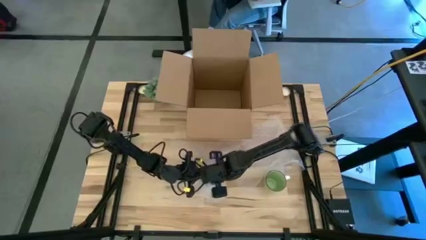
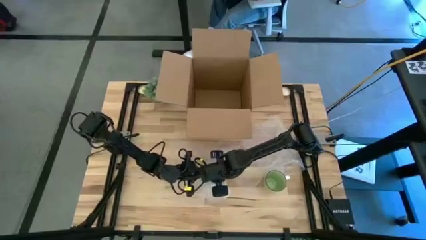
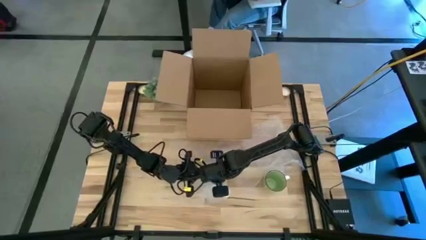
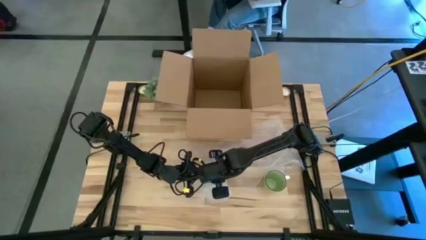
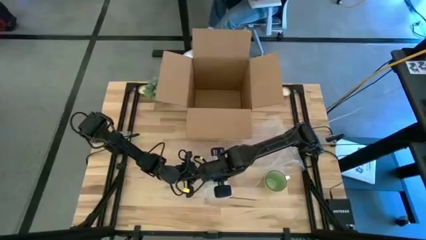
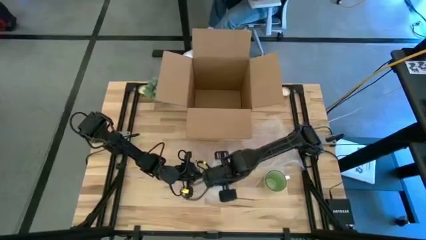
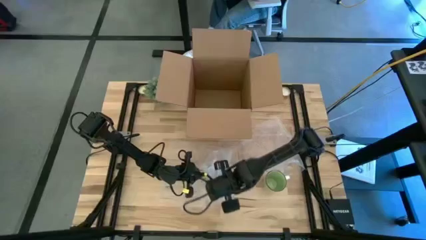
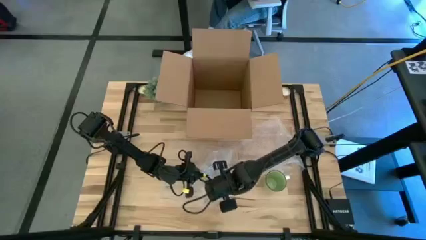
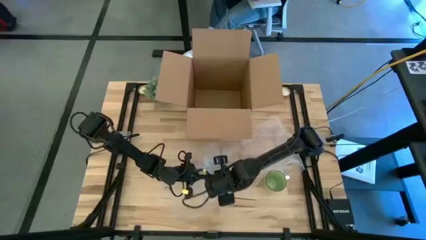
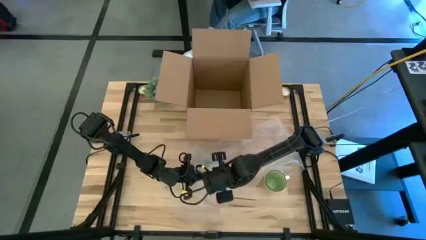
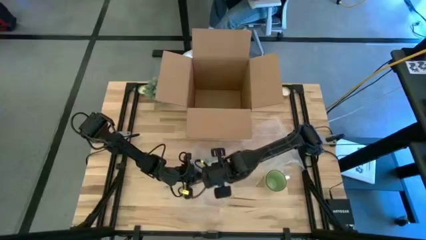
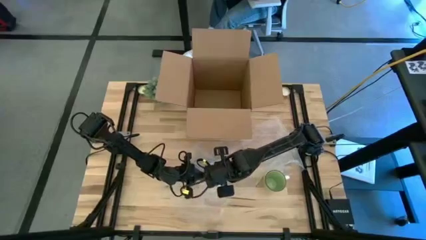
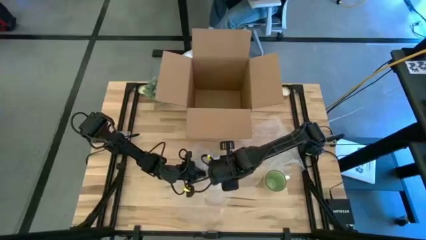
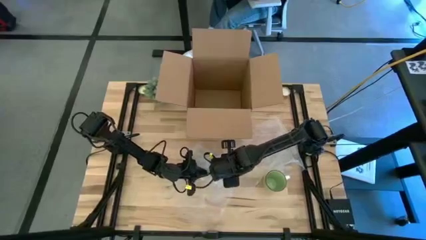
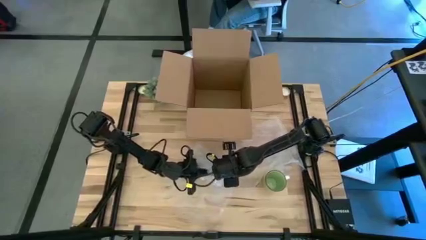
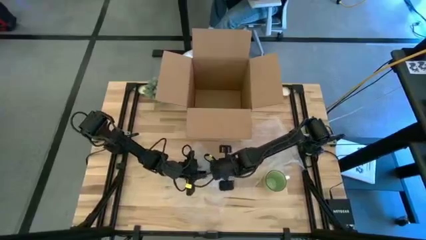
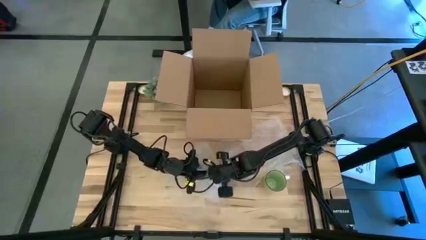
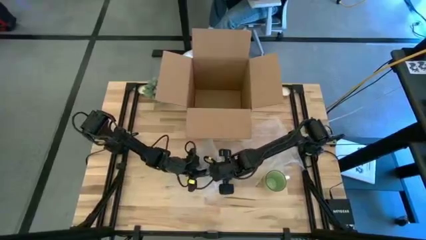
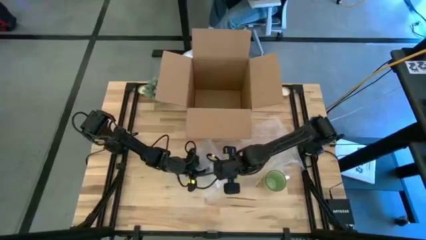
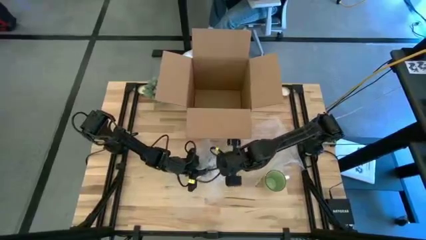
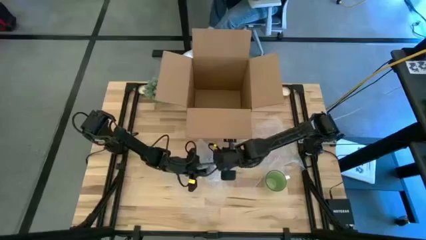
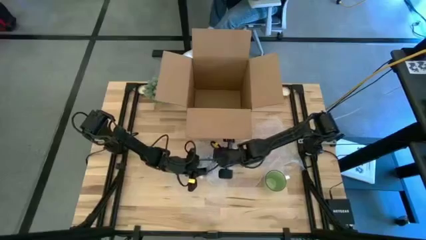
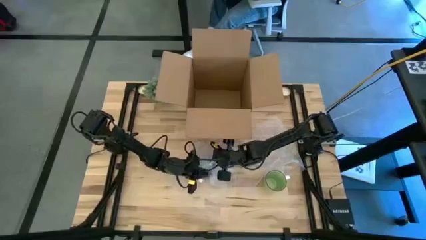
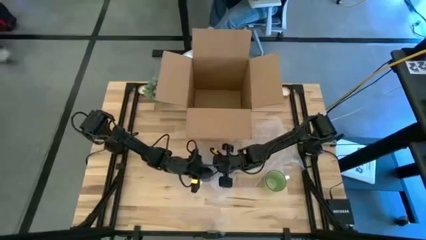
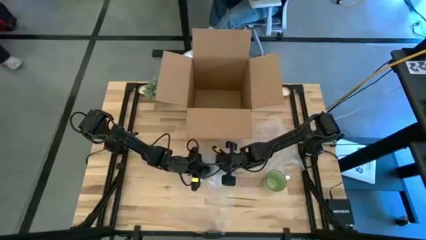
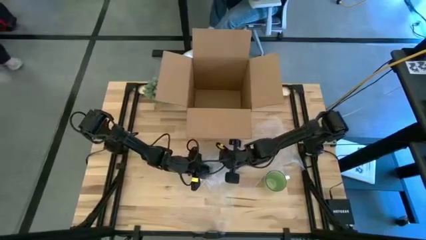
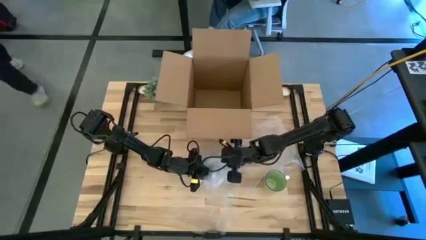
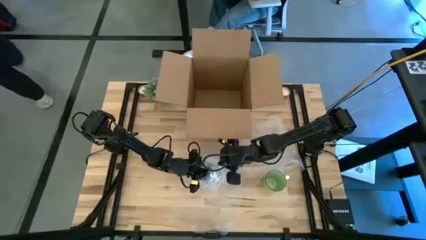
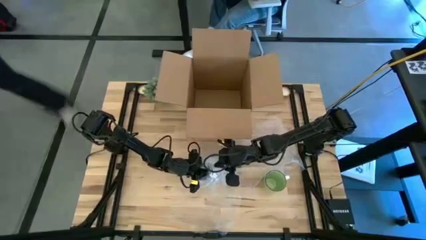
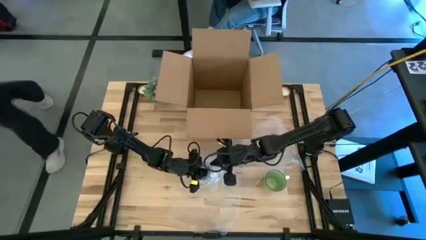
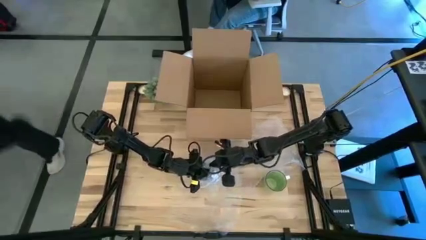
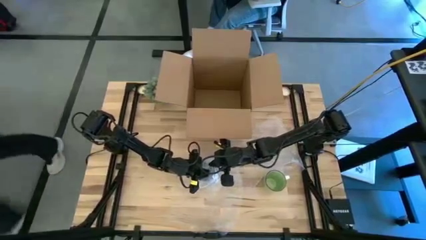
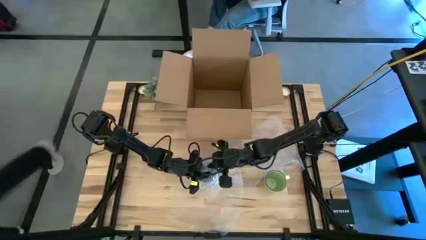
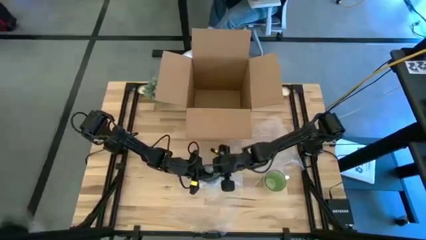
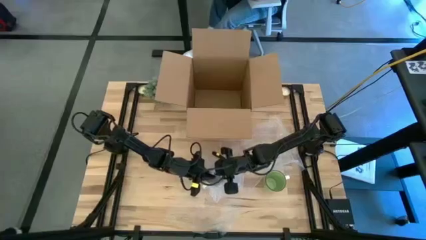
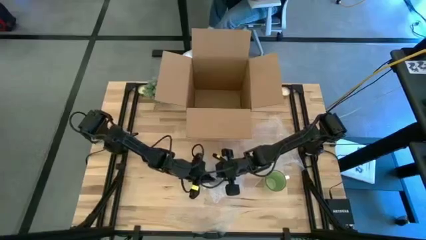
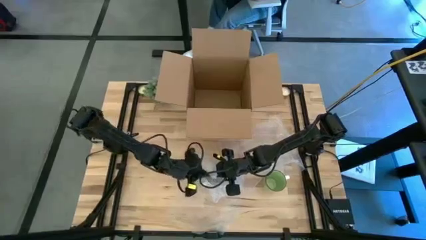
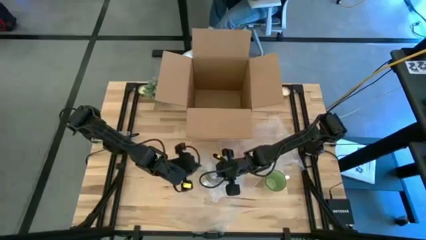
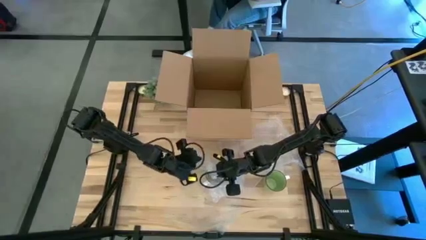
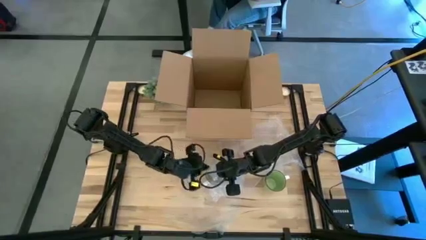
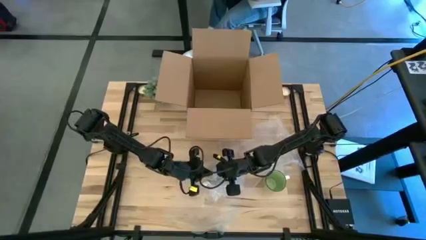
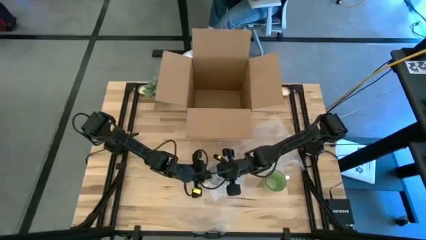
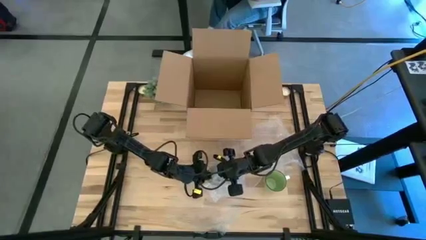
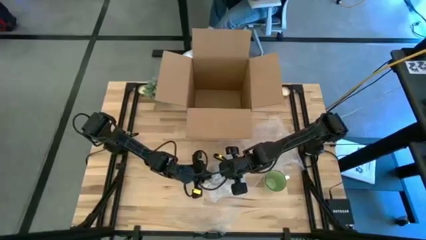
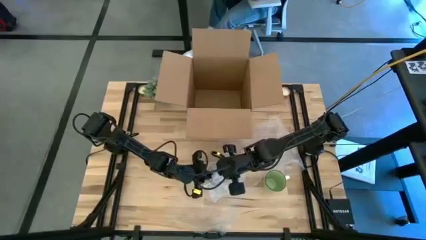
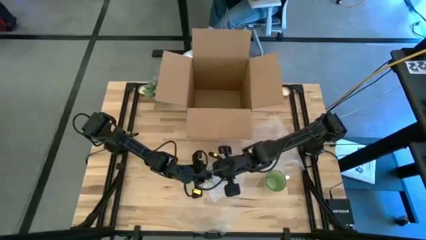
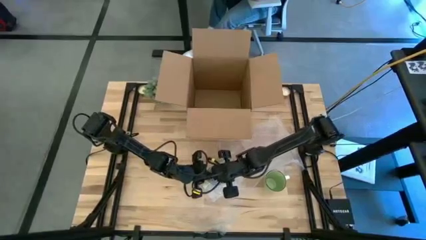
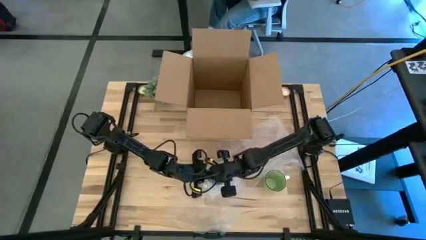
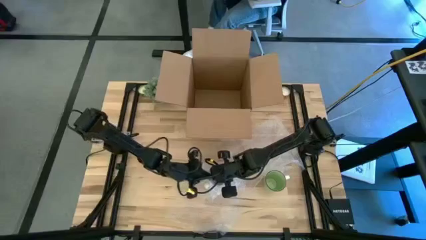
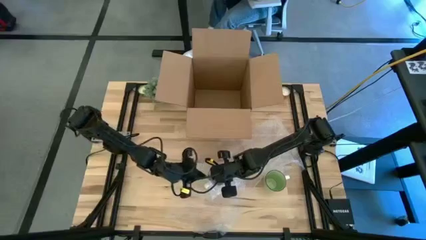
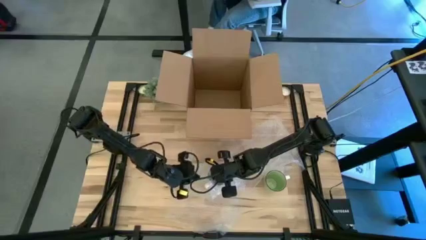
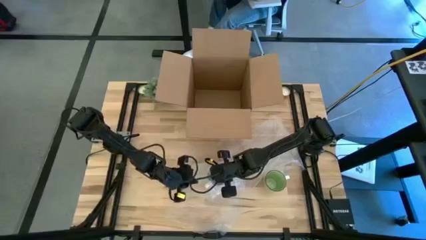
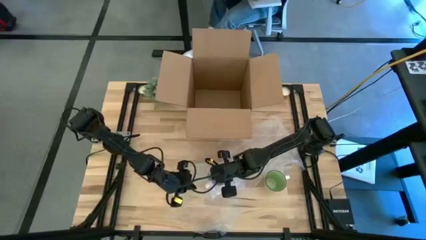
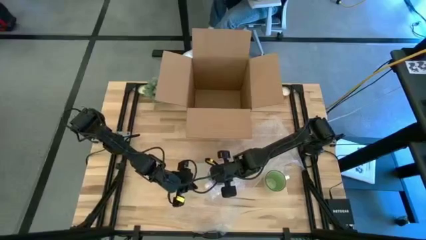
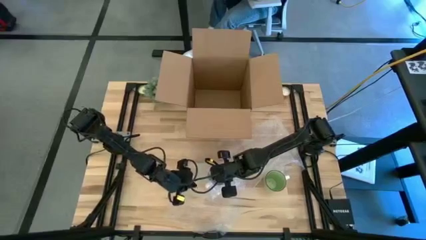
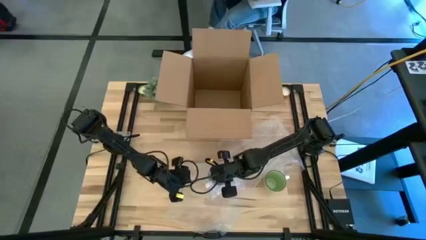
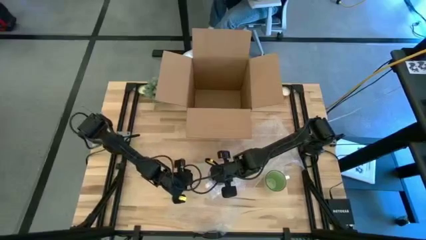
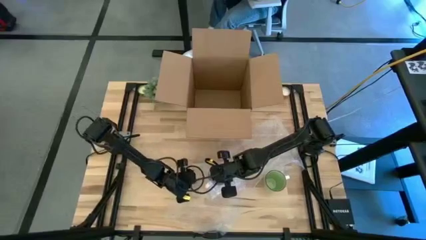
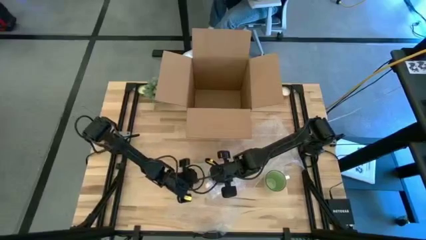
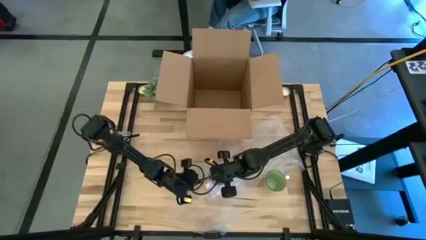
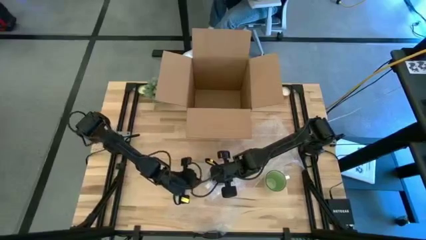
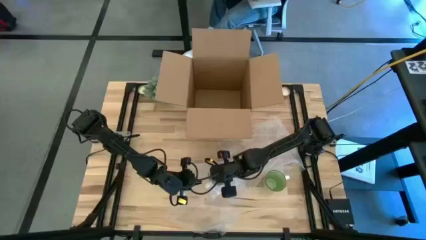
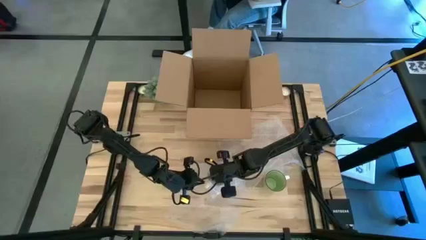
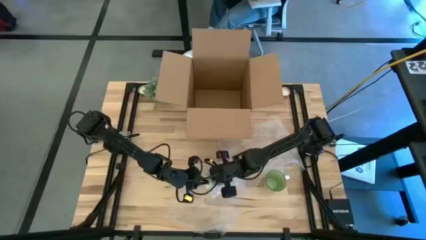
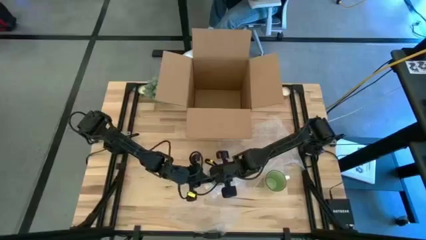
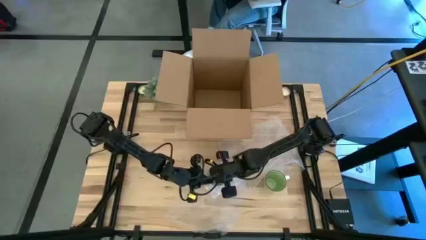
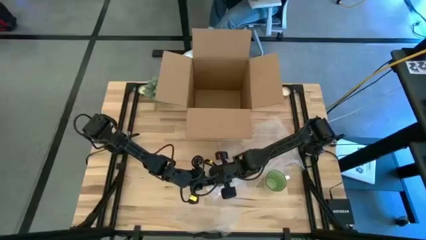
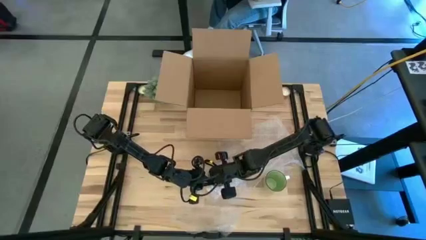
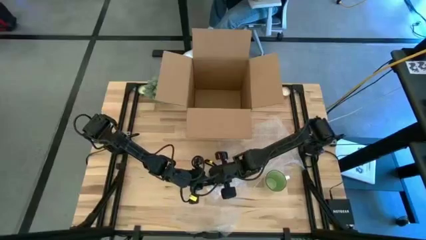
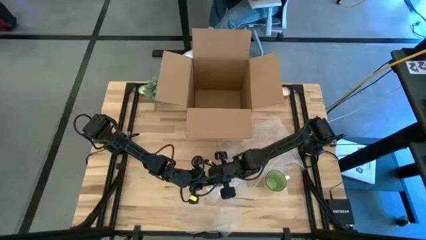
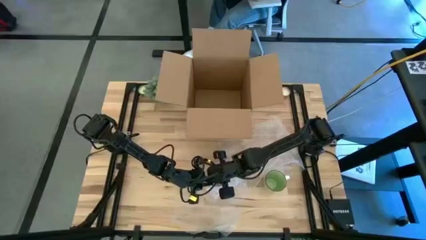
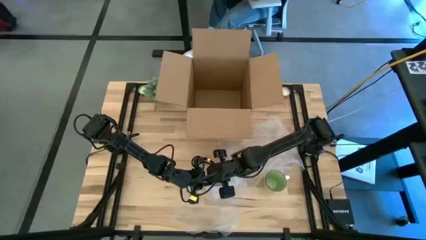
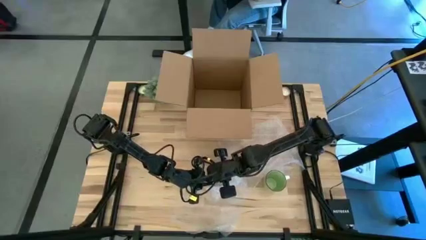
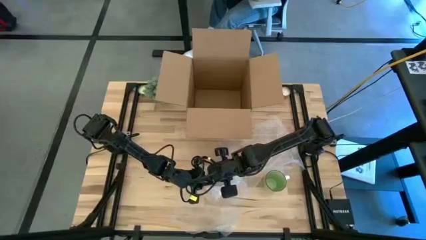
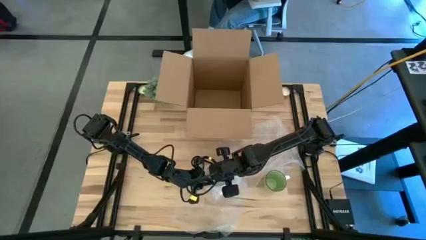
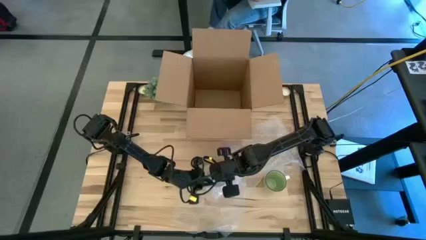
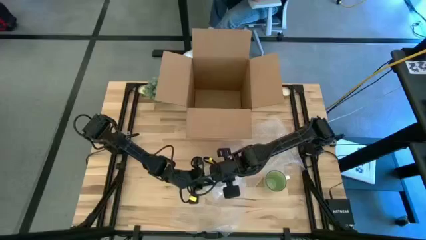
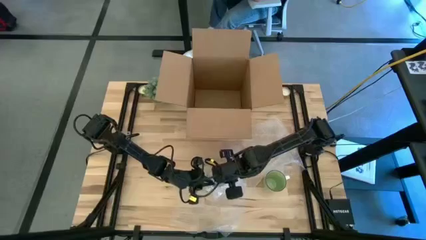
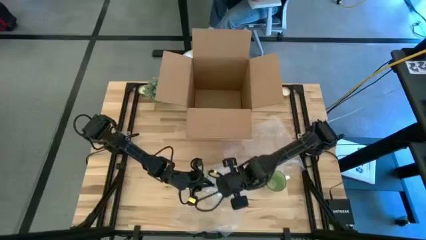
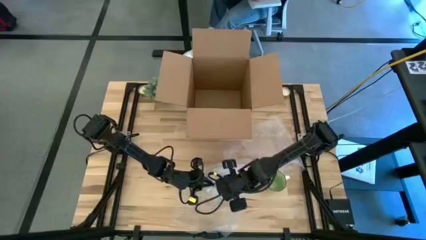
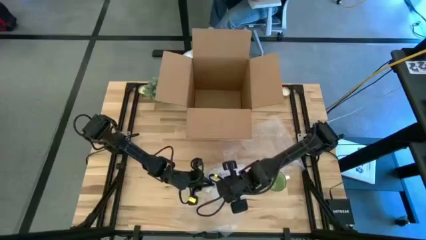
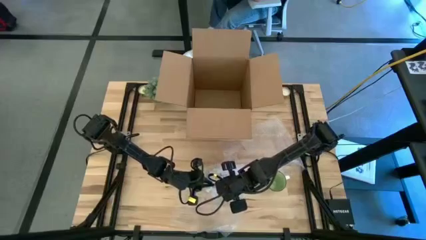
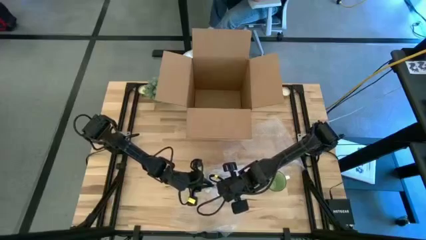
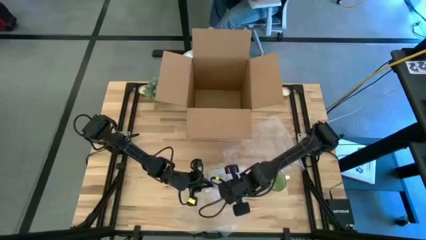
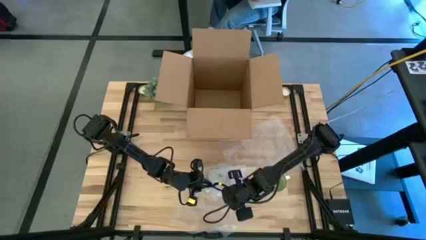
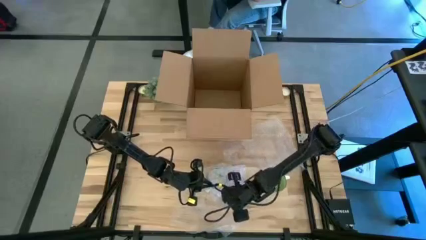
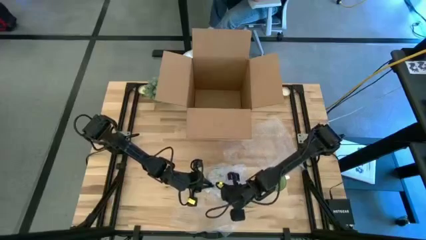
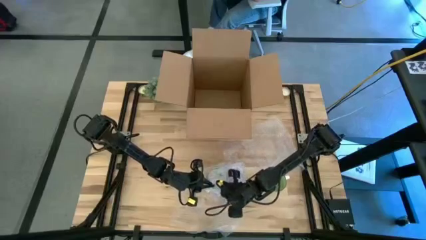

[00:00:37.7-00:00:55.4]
Task: wrap mug
Wrap the white mug with bubble wrap
